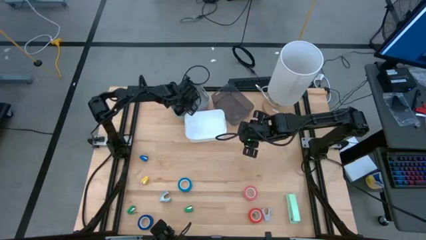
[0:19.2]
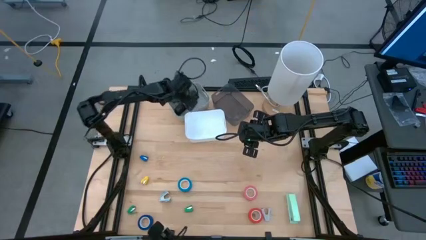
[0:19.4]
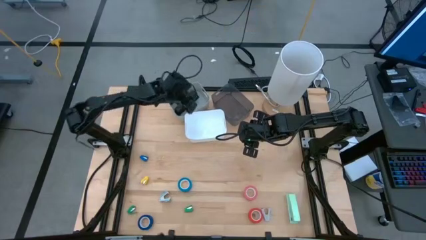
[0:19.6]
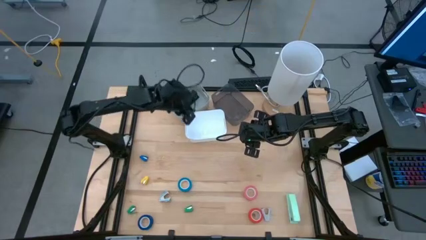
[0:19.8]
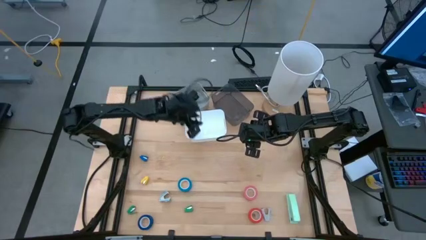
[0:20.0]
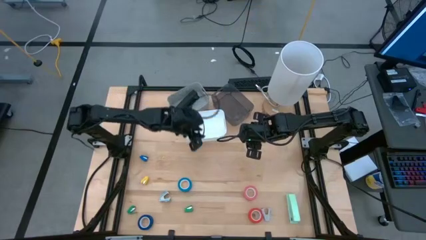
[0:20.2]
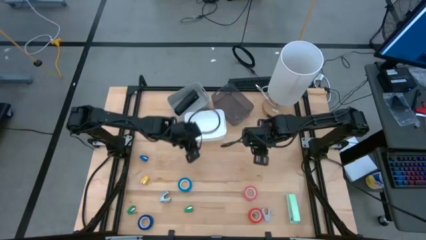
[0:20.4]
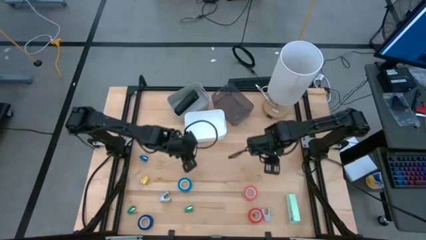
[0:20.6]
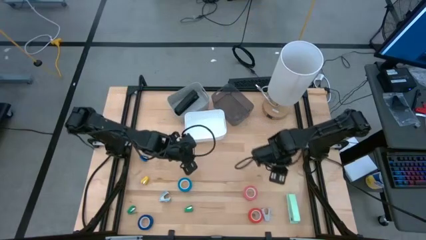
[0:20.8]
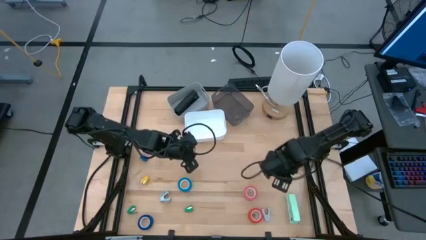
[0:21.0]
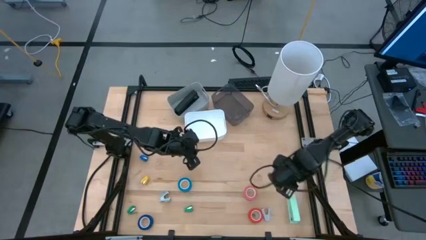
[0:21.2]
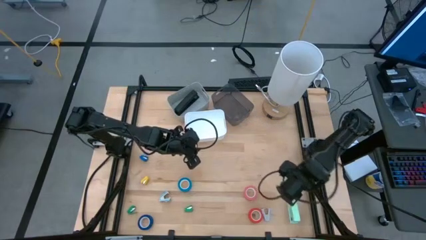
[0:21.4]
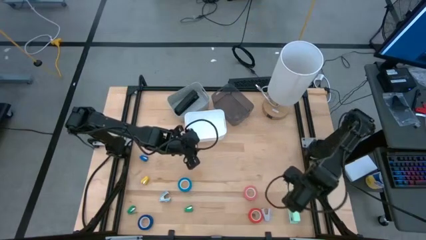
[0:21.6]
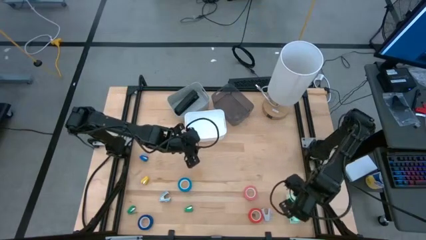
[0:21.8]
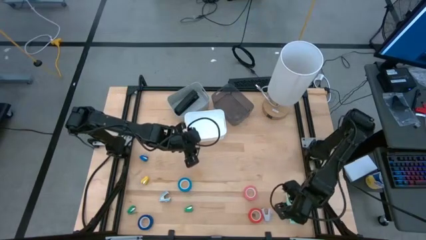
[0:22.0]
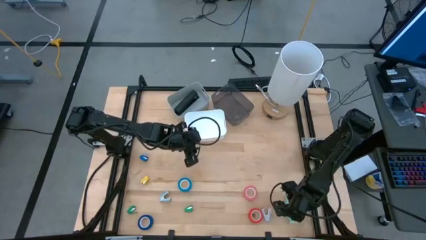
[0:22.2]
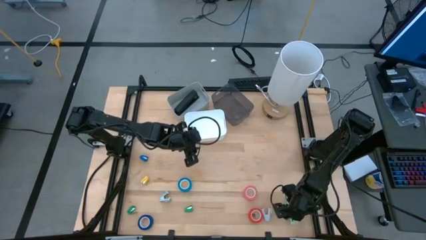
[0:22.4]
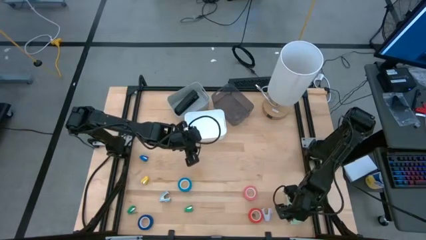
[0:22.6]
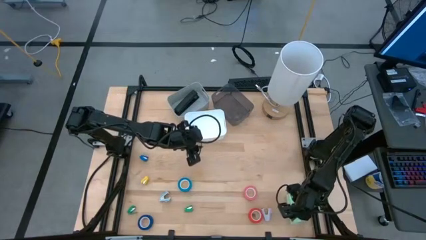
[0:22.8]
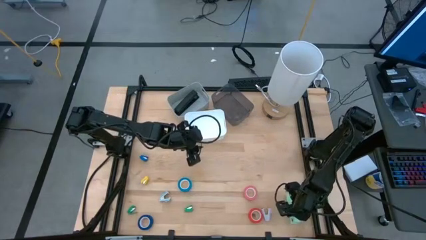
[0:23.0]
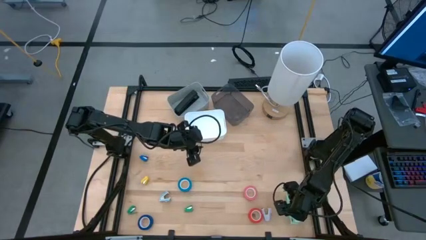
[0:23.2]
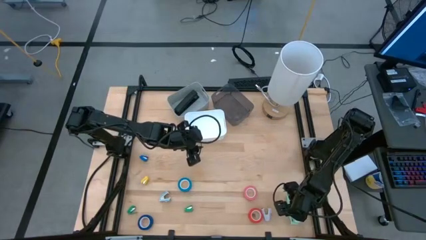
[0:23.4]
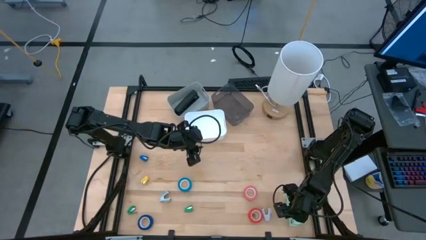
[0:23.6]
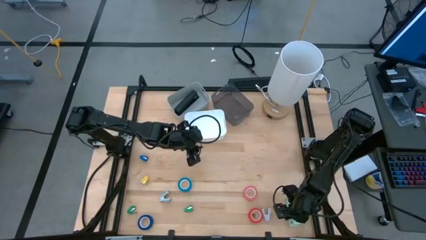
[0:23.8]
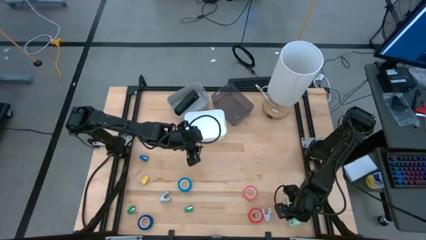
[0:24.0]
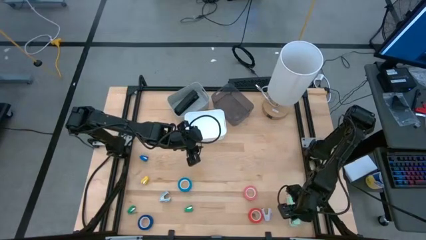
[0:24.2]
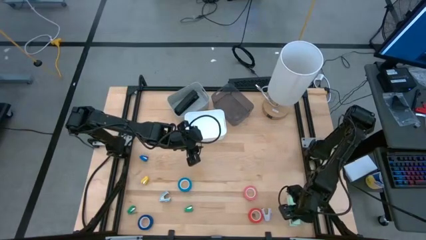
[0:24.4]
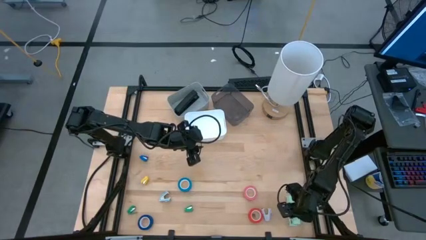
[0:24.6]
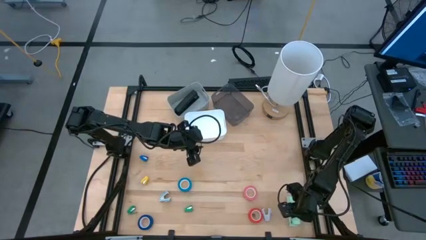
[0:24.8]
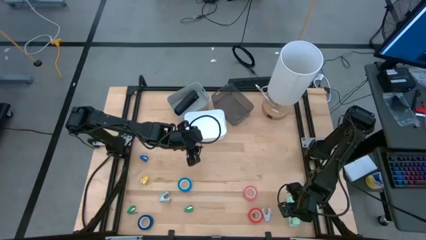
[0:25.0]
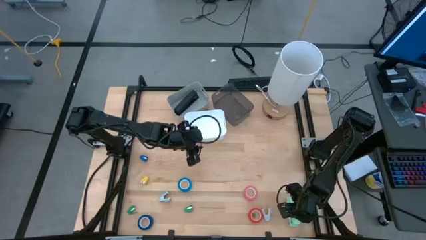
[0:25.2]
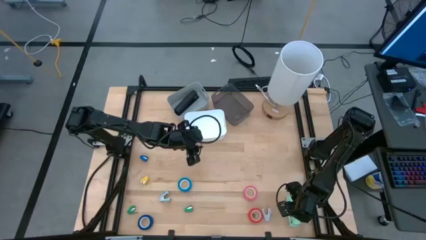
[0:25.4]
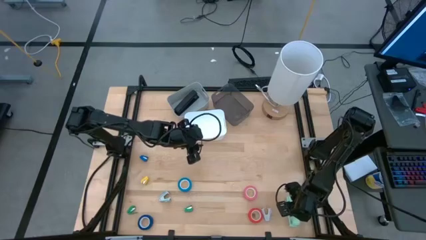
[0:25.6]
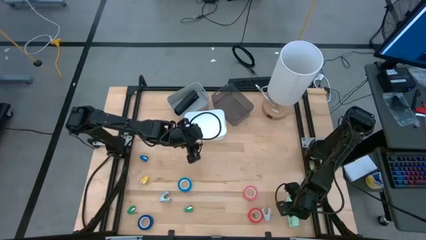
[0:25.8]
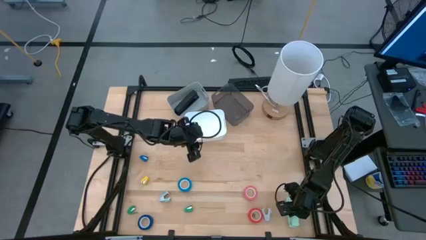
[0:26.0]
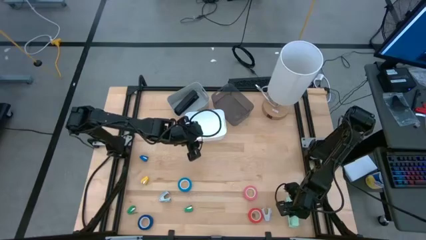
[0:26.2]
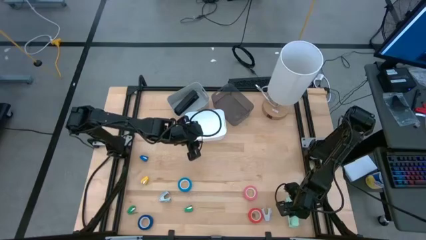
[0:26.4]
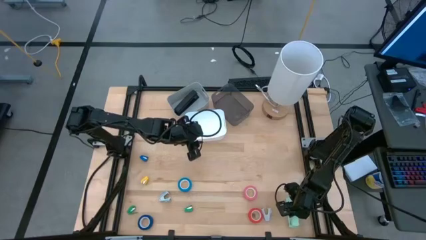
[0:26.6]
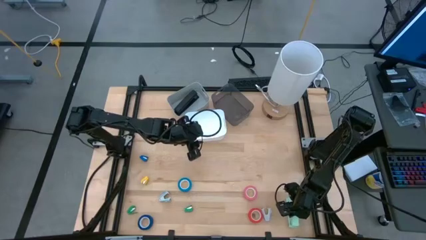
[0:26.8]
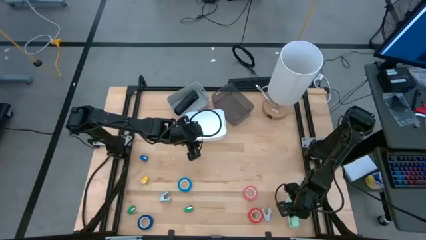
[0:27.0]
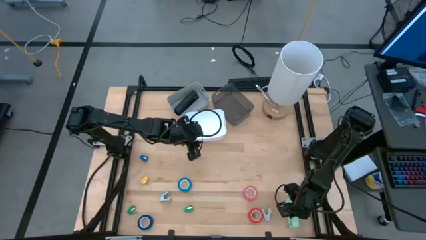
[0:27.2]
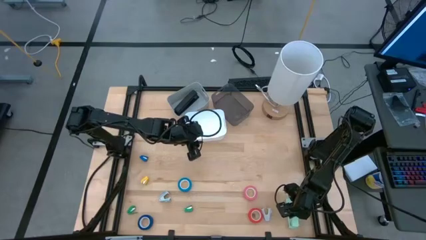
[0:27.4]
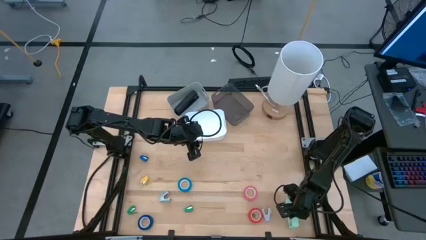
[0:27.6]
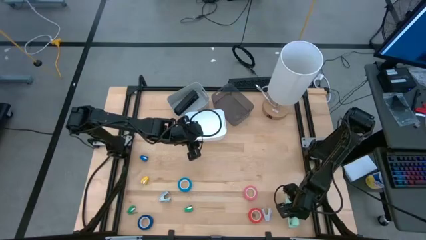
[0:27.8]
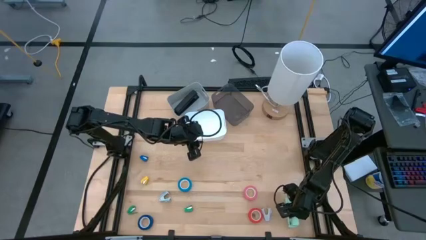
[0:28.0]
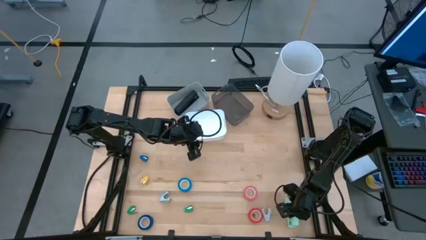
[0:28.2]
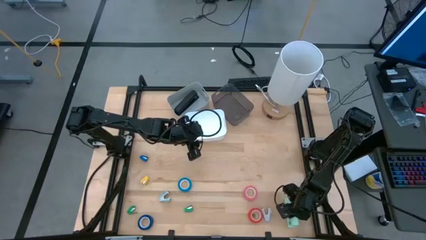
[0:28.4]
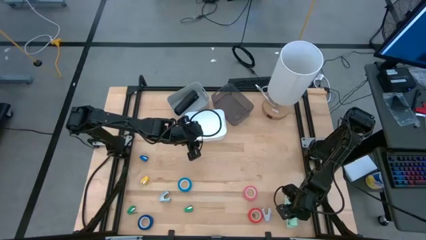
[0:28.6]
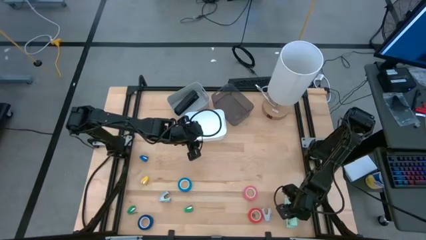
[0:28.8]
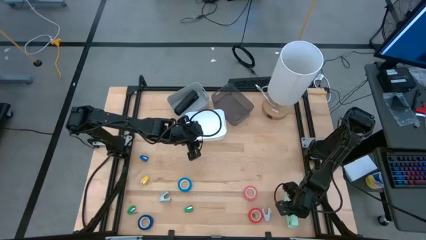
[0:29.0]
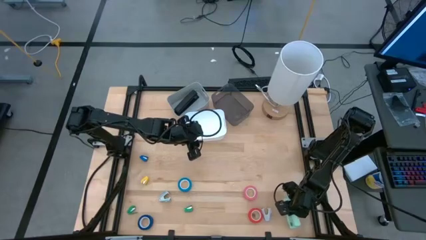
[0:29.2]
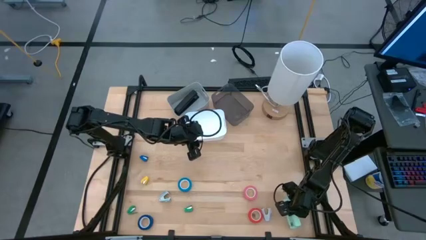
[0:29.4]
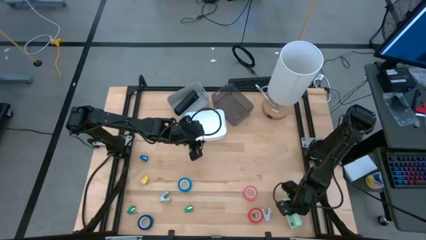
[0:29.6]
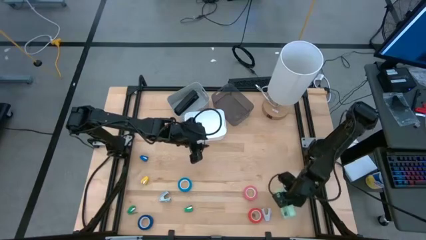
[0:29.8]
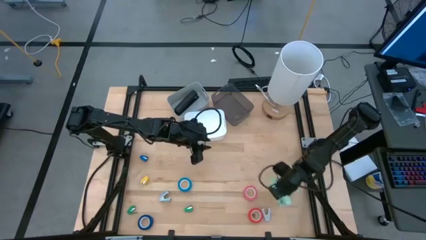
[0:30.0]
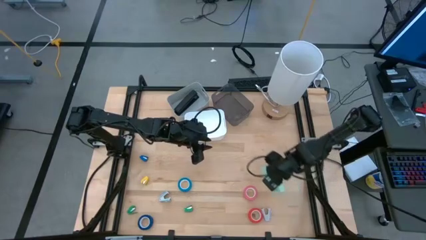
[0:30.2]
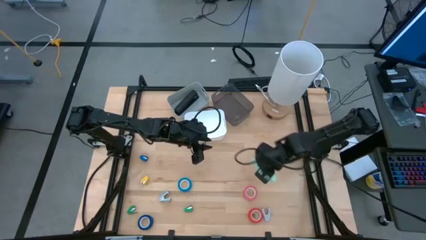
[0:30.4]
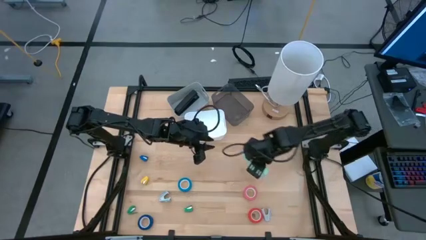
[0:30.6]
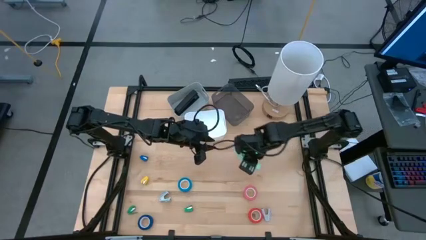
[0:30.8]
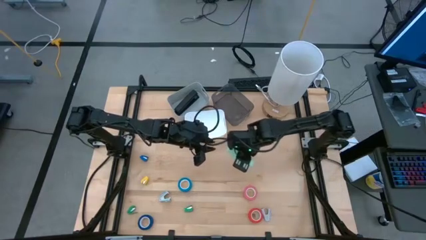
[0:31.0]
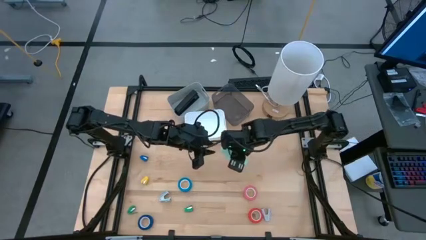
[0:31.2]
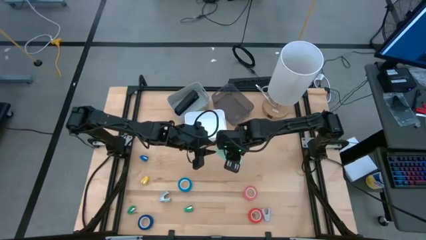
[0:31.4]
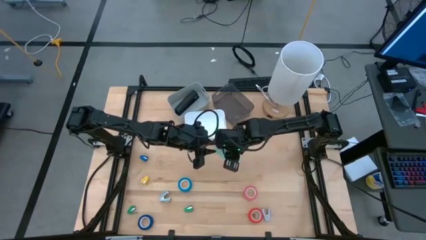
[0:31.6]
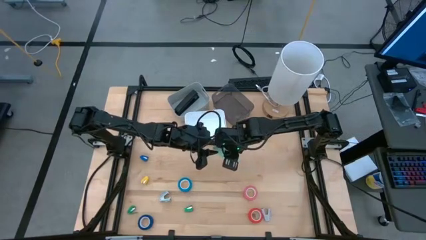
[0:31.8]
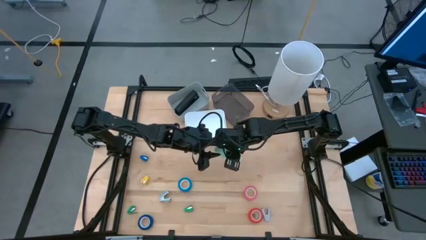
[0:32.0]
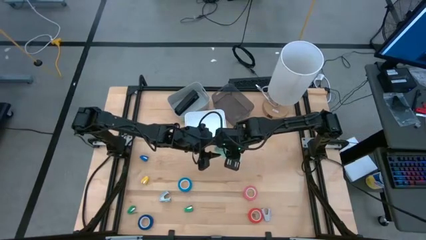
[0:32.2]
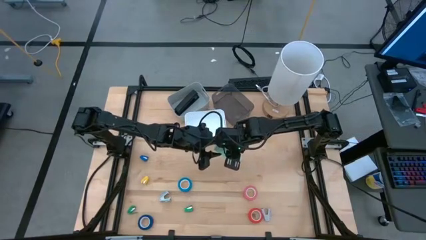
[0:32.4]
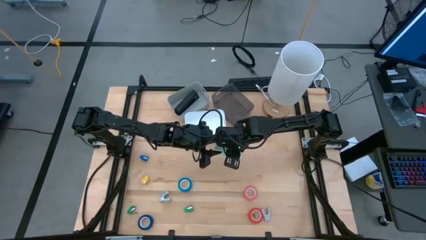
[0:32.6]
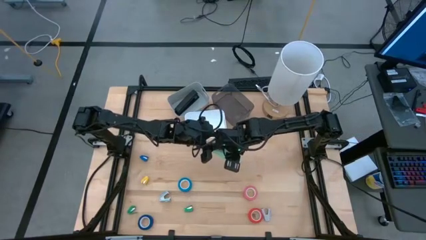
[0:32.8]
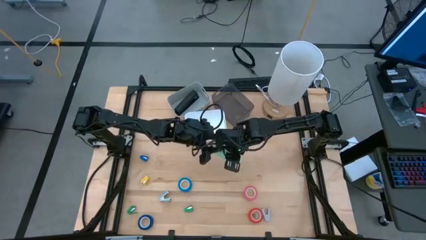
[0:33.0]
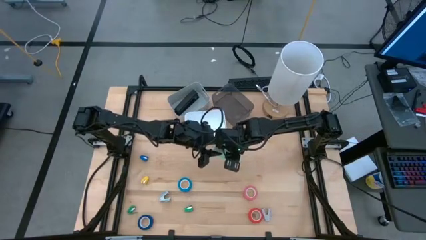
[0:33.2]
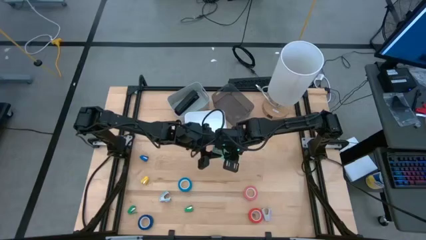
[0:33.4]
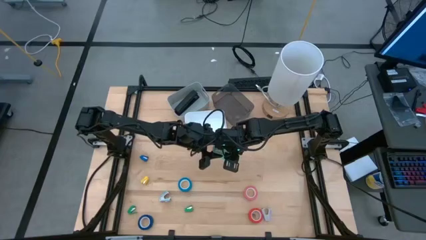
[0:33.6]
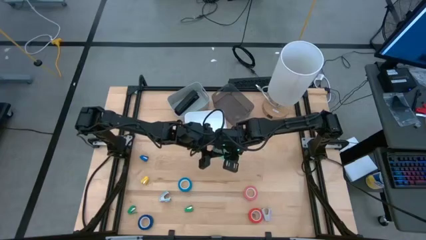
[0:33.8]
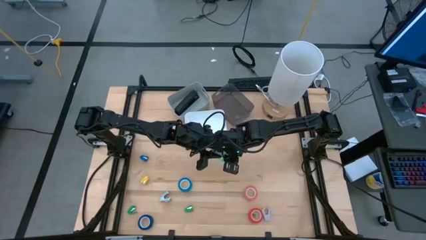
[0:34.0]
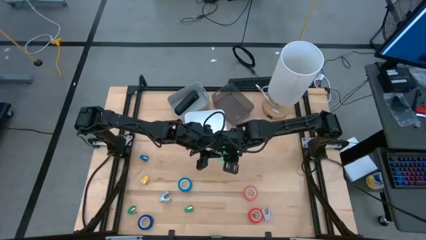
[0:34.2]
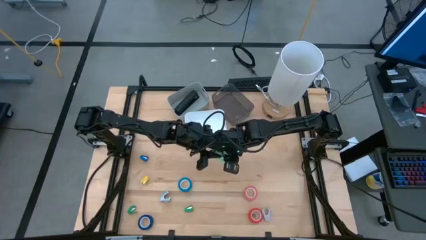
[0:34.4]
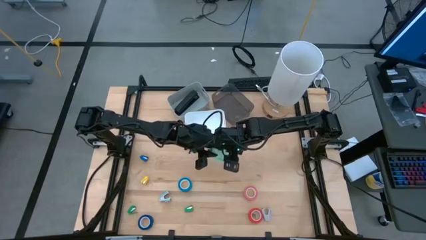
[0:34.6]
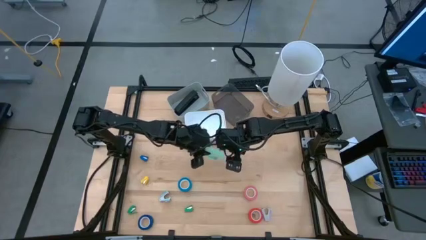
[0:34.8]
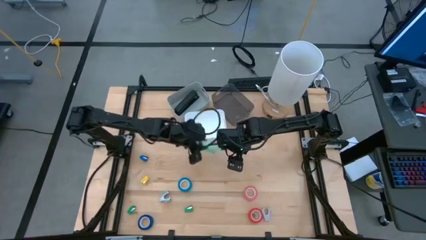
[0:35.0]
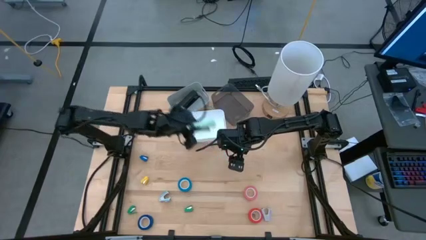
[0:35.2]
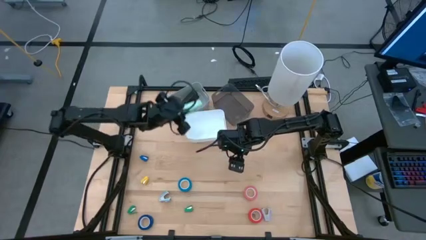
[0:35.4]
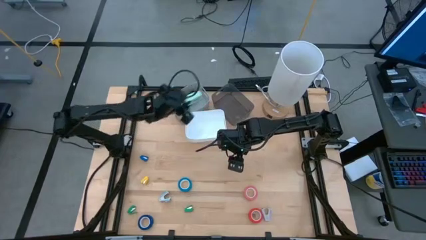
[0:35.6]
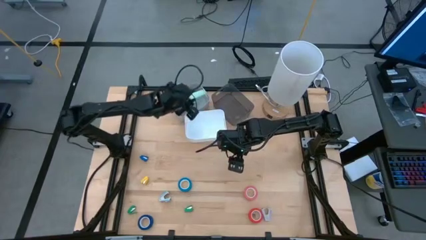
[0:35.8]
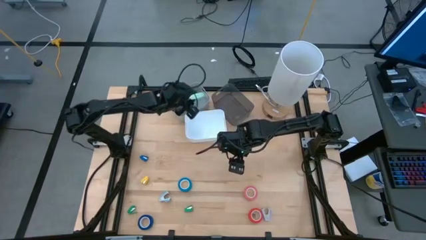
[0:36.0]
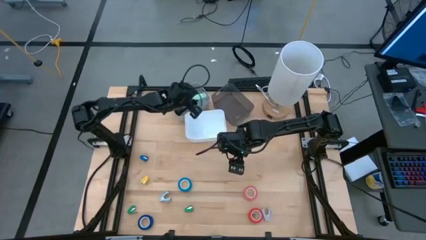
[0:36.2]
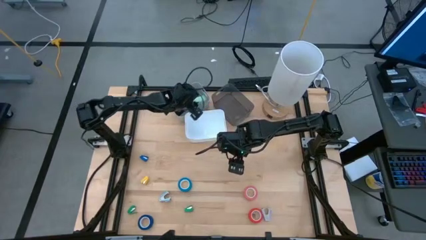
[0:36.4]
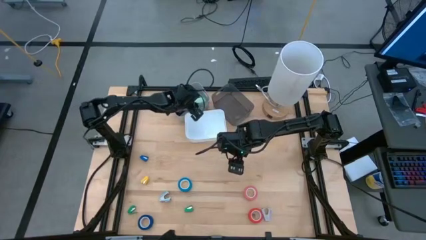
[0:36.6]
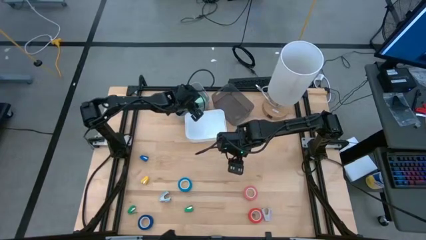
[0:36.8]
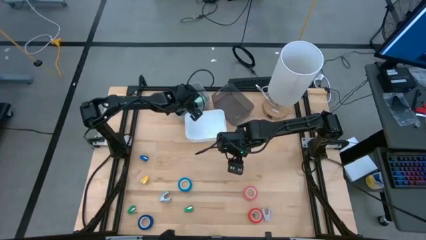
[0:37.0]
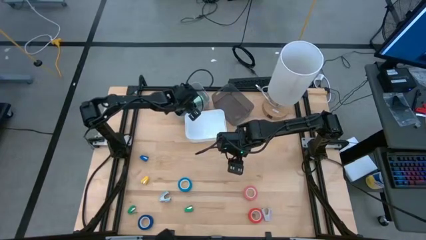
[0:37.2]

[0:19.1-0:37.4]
Task: Pick and place Stapler, Stapler remover, tape
Put the large light blue stapler into the gray bin
